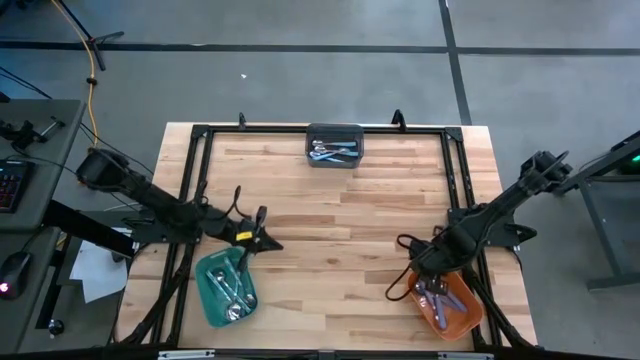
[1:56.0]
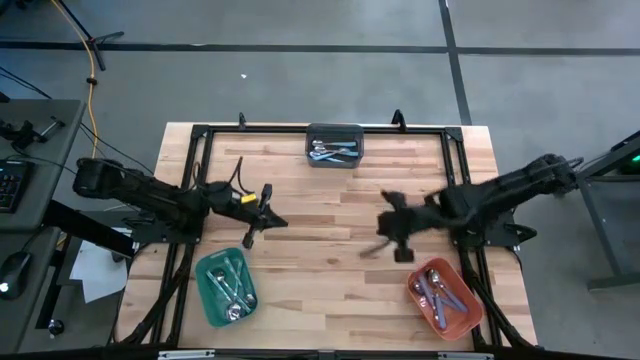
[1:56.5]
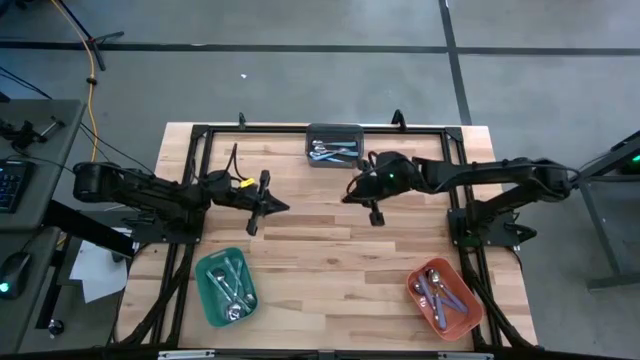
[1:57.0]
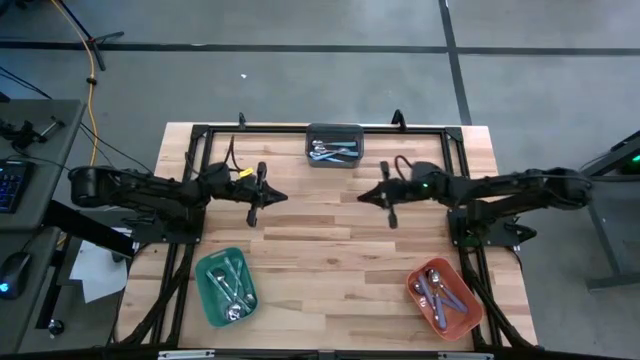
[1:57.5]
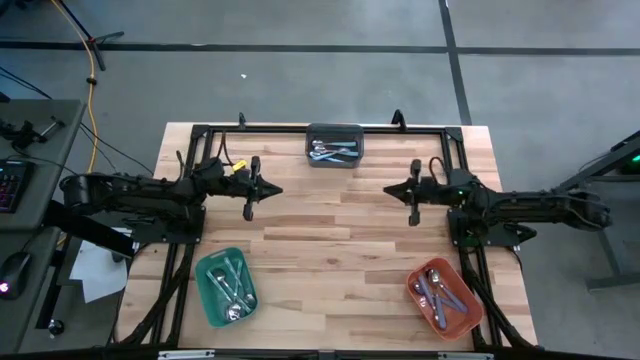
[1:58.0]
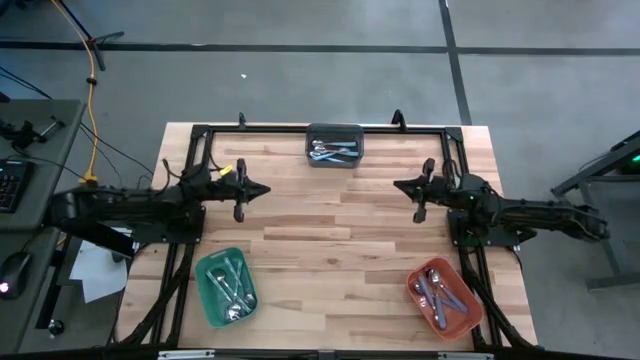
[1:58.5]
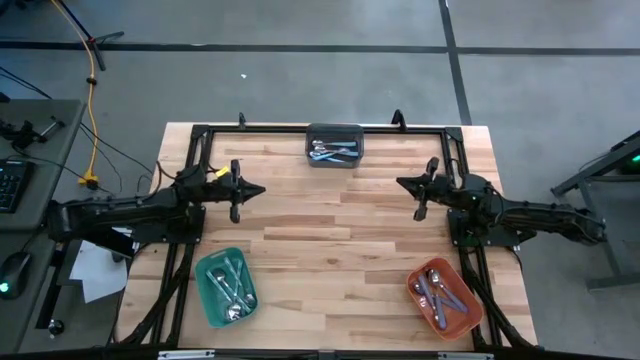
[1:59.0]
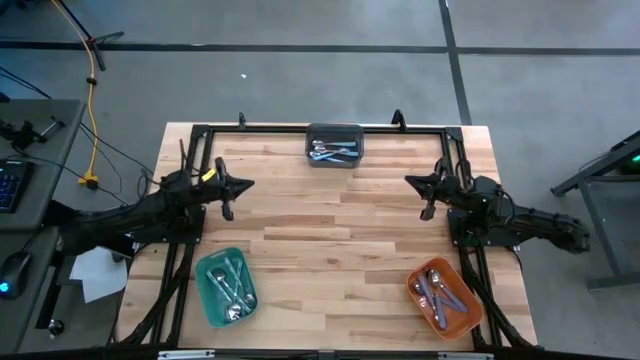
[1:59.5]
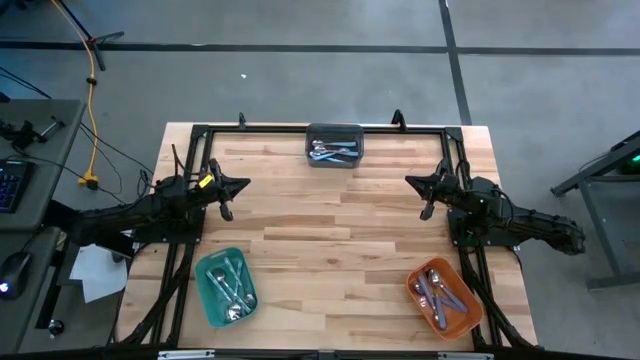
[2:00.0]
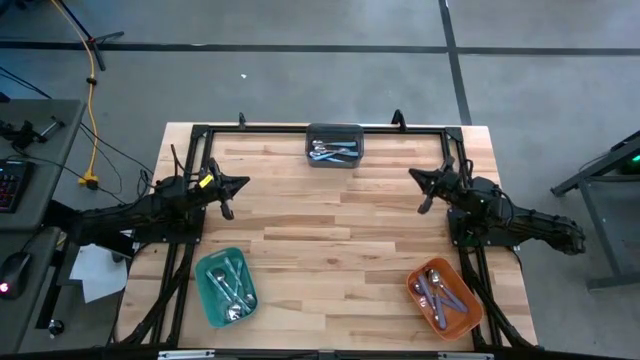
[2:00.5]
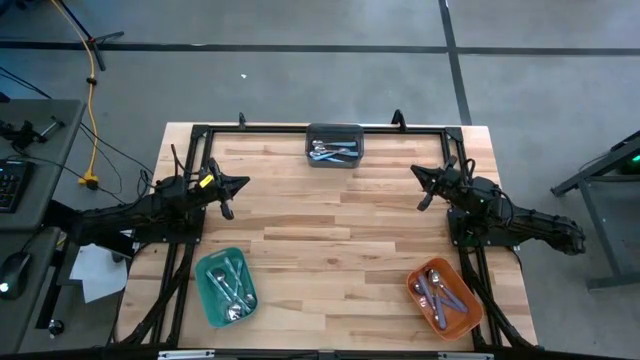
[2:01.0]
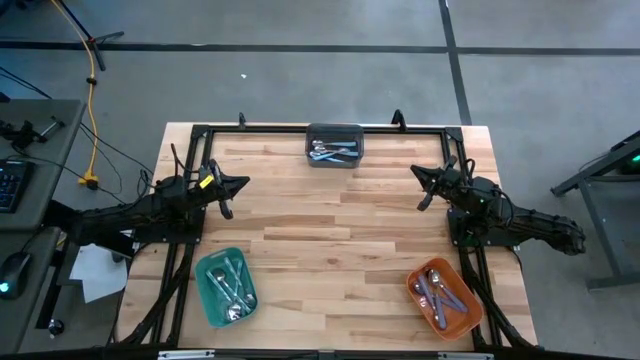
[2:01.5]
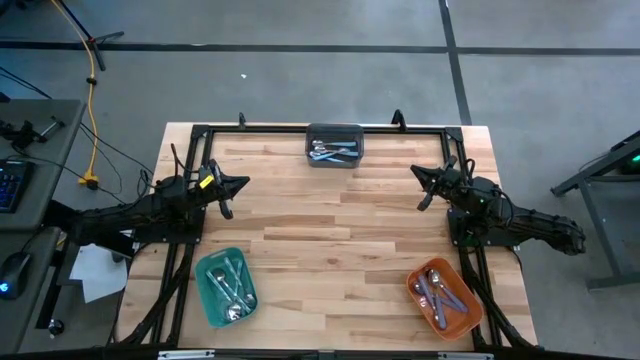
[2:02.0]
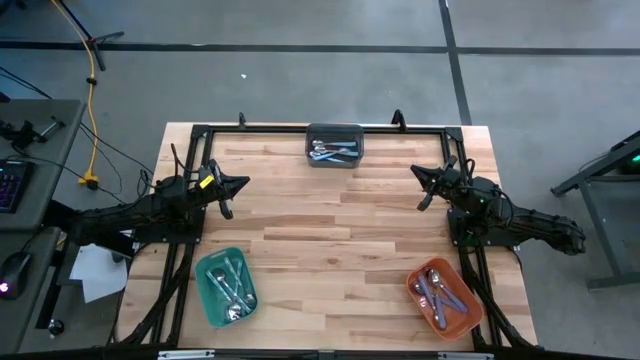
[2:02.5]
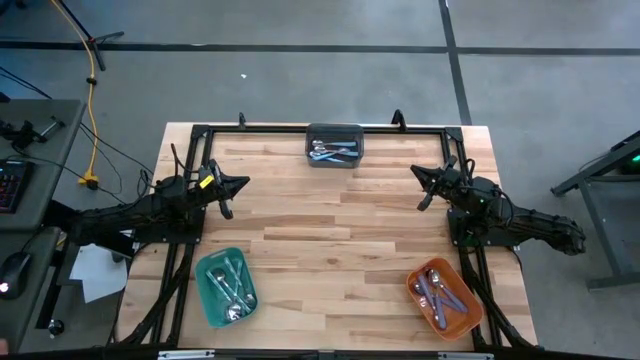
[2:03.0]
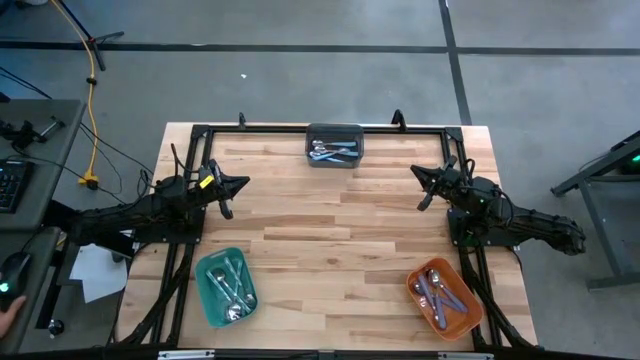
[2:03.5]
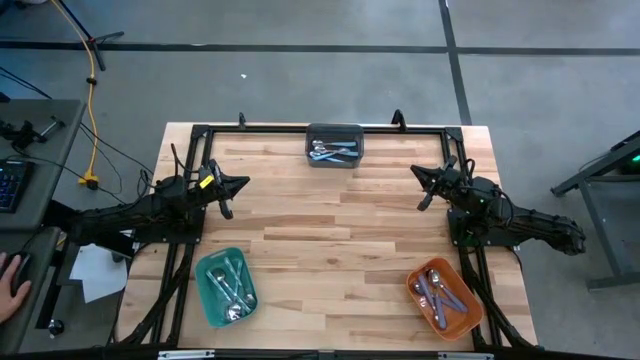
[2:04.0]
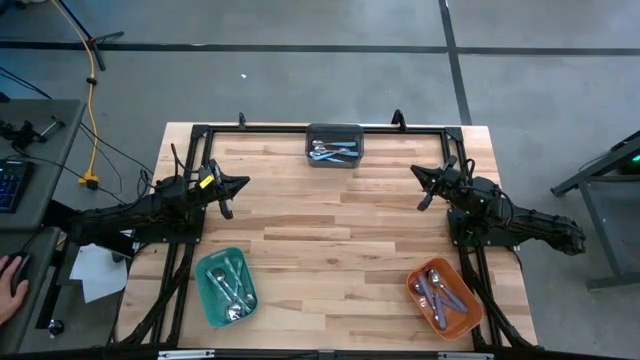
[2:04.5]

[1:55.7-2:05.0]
Task: Sort silverware by color (type)
Return to Home Position

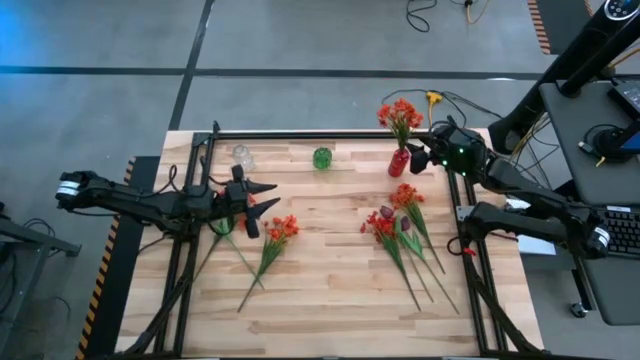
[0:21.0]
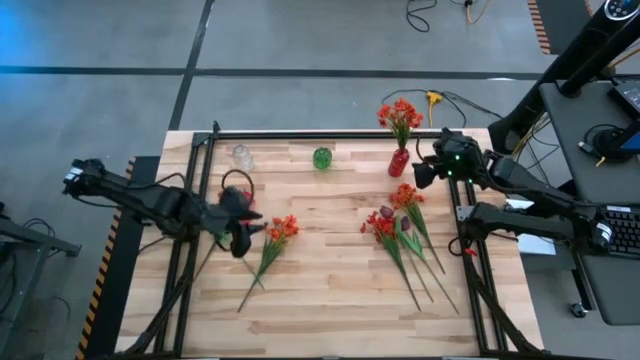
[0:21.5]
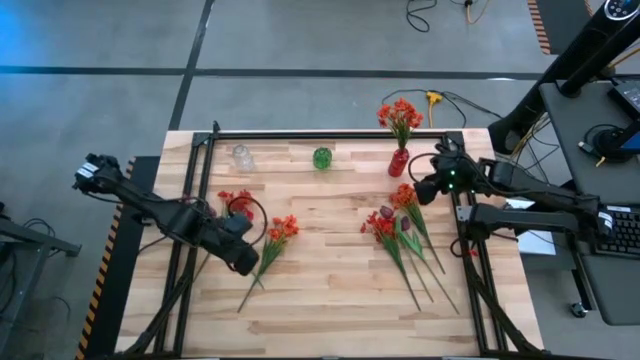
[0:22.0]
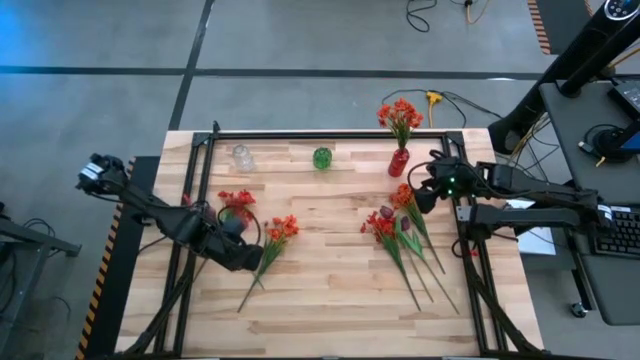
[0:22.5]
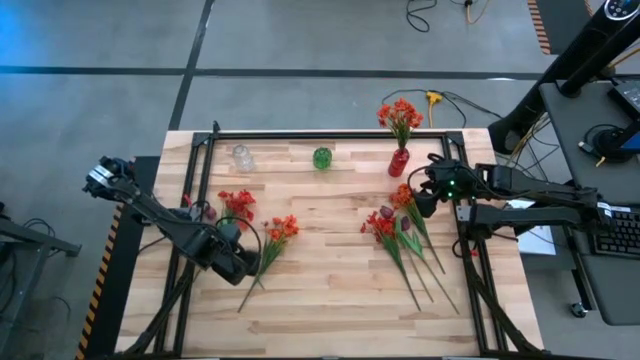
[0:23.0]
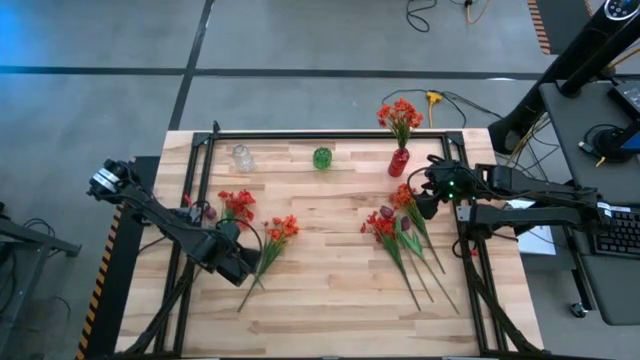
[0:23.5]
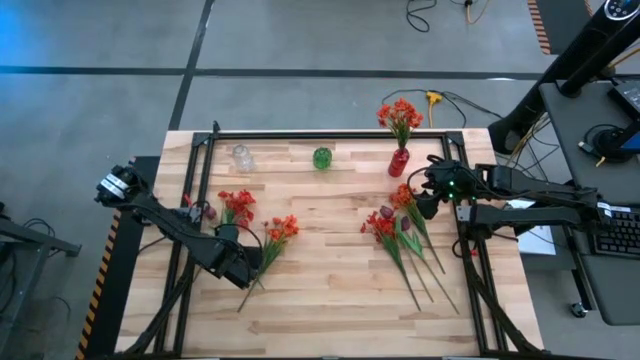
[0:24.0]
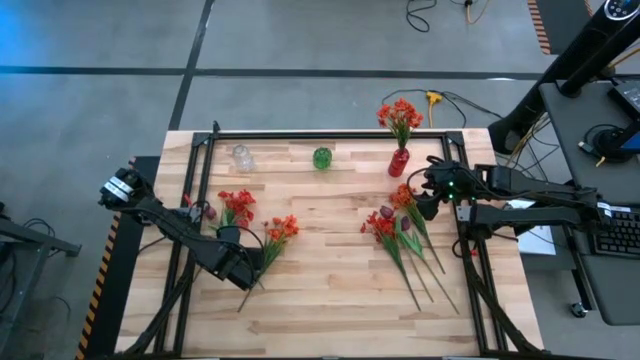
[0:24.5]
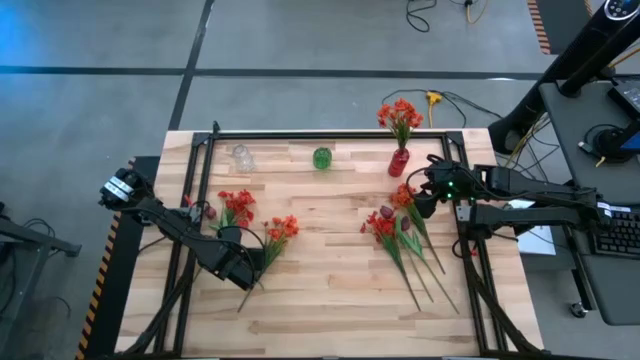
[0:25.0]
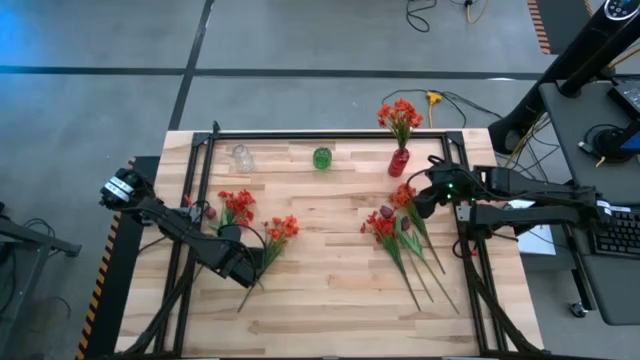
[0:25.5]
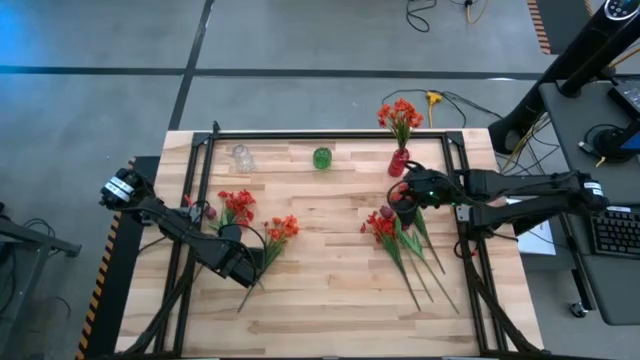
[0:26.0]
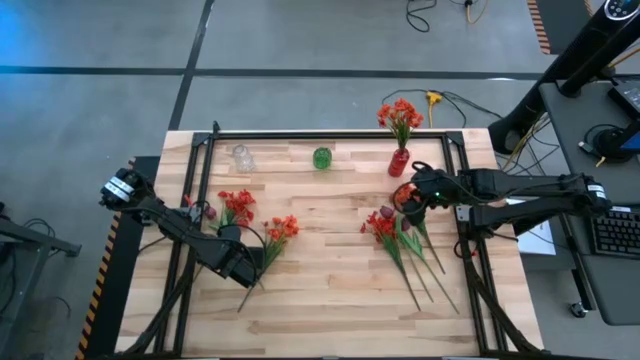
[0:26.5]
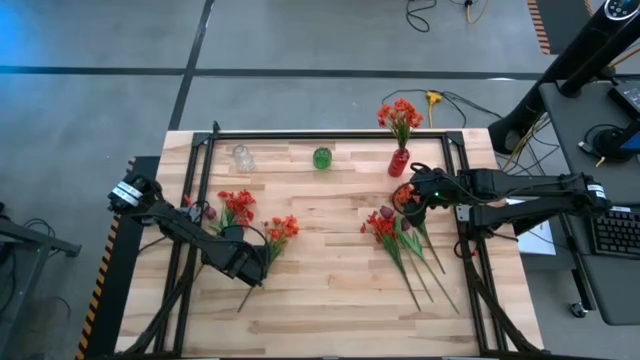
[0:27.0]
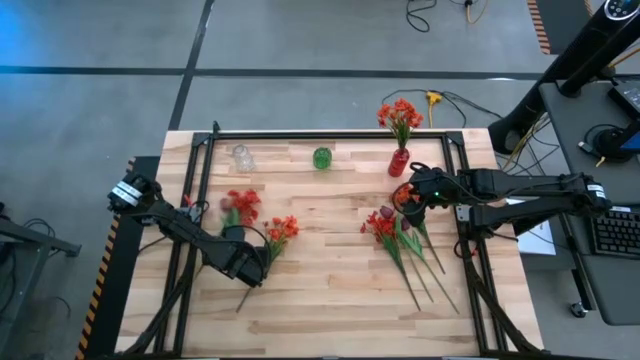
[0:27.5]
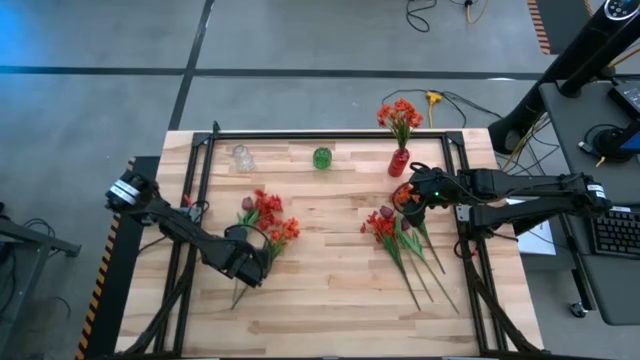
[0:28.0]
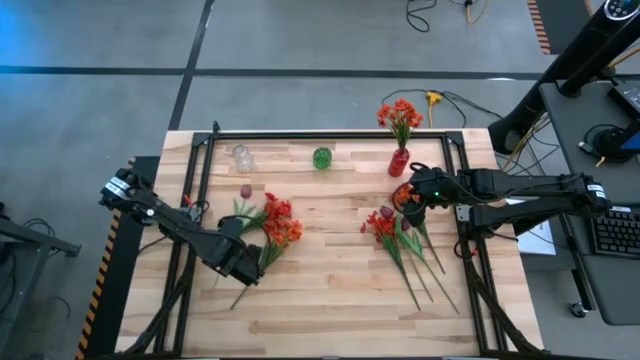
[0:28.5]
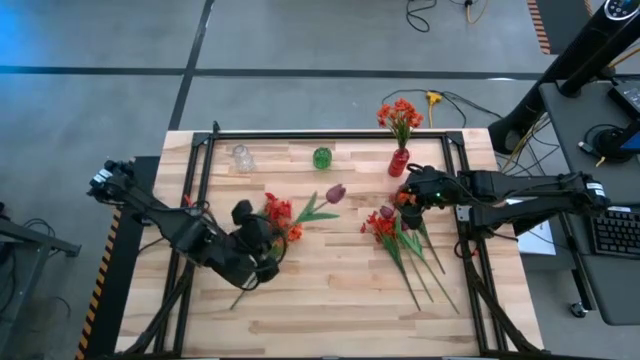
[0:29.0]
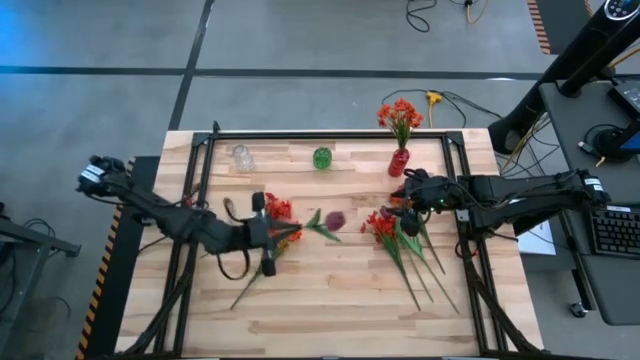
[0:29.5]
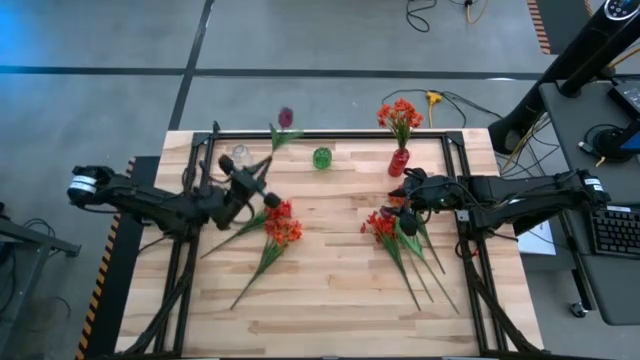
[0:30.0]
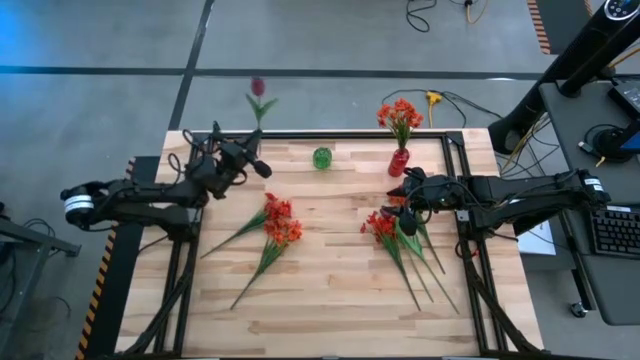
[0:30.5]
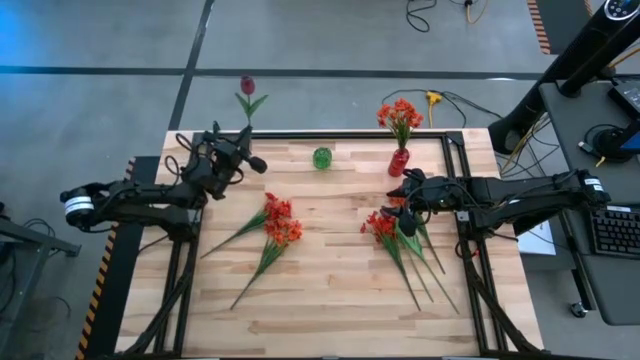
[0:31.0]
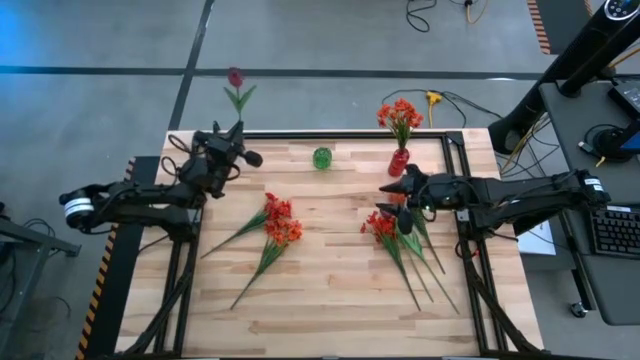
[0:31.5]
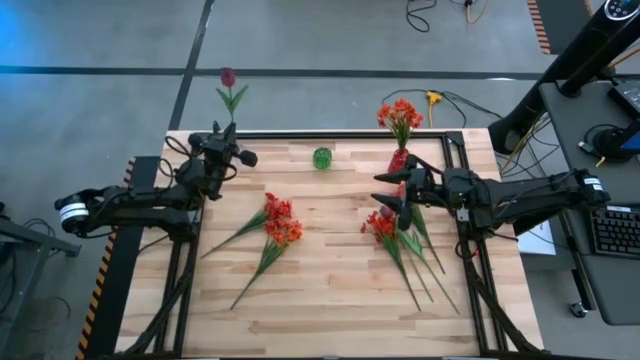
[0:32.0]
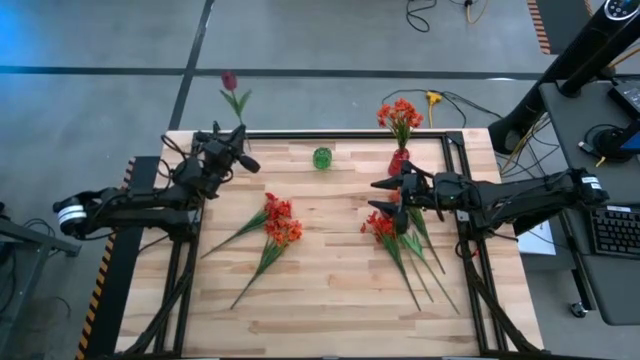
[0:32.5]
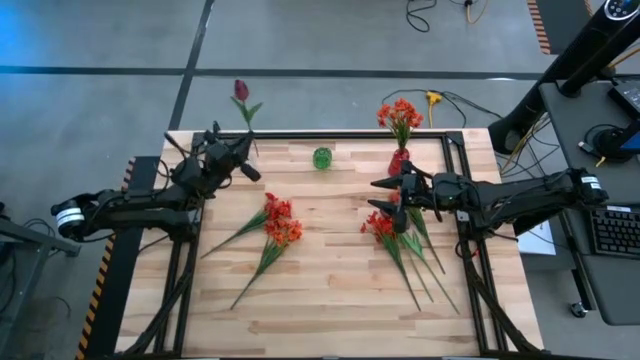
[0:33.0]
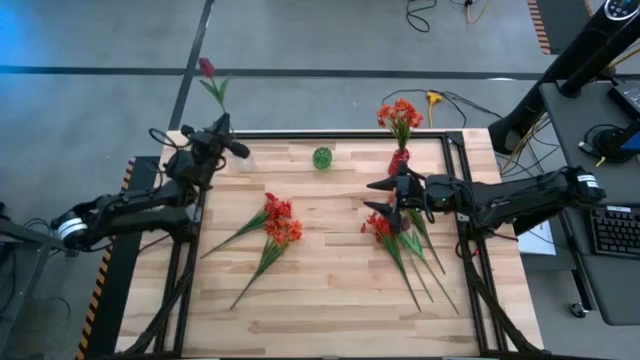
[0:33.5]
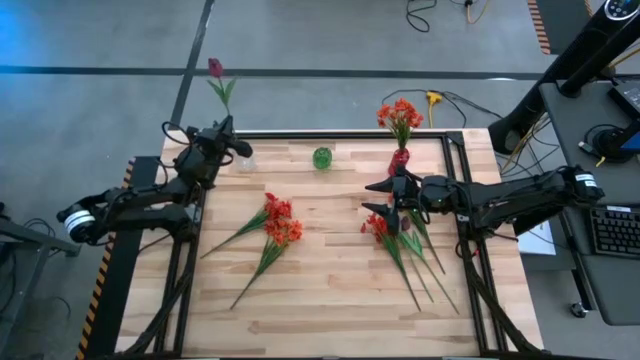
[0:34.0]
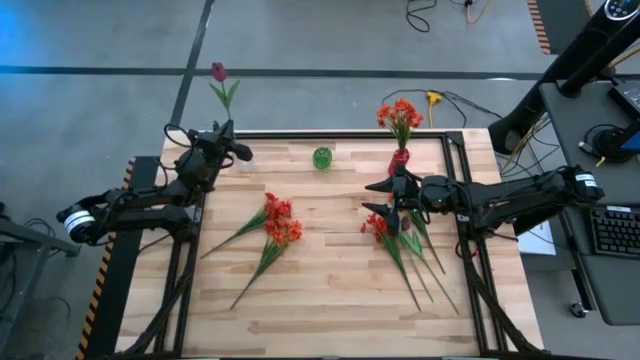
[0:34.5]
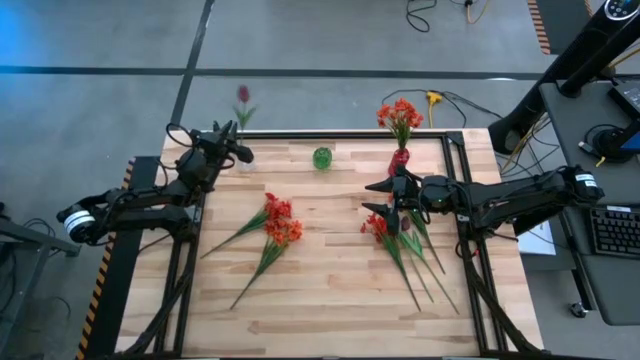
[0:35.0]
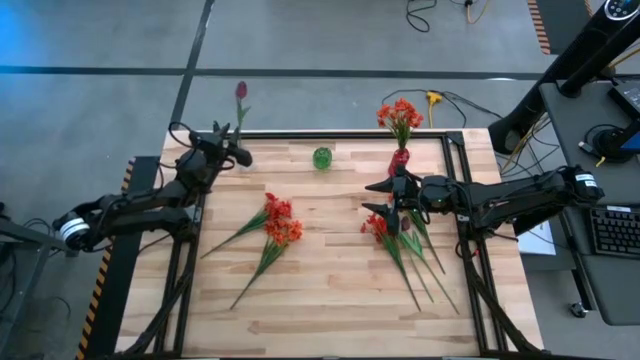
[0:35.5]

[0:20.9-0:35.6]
Task: Sort flowers into vase by color
Put the left purple tulip into the transparent vase
